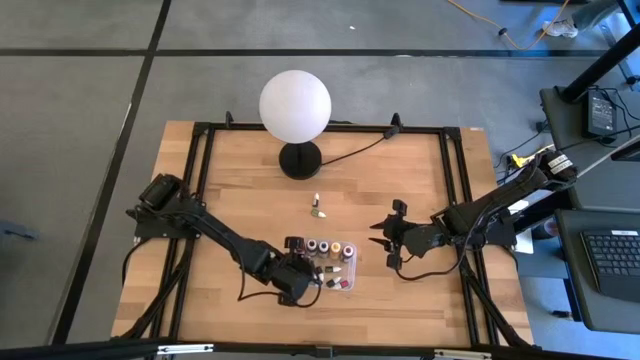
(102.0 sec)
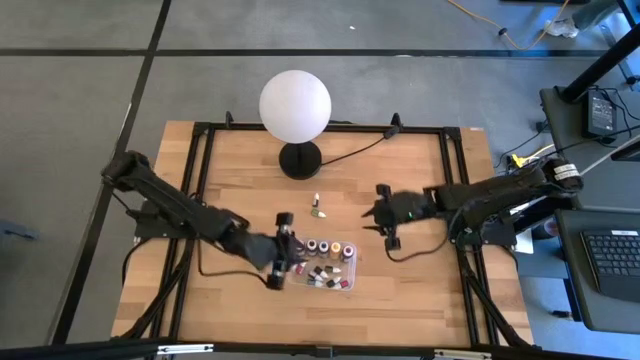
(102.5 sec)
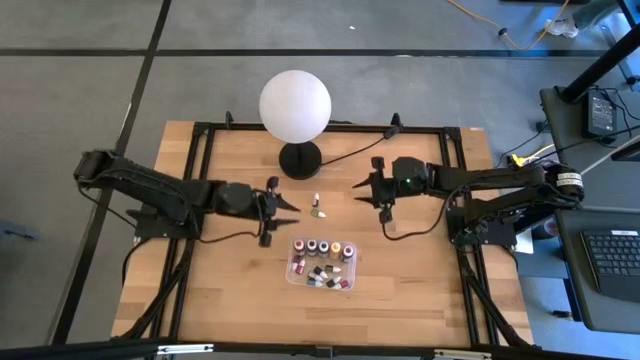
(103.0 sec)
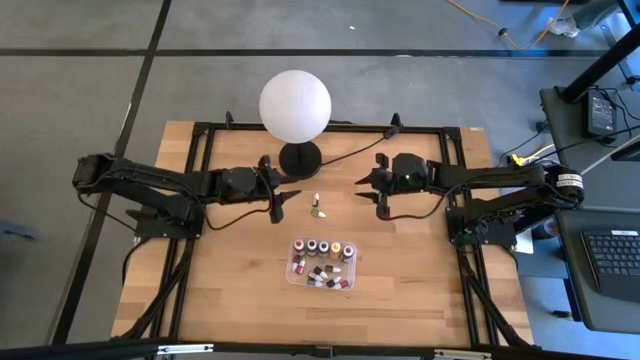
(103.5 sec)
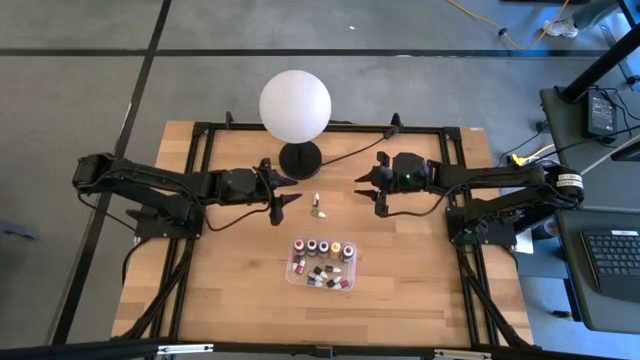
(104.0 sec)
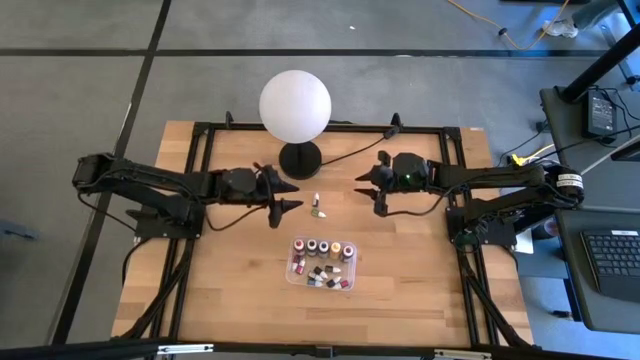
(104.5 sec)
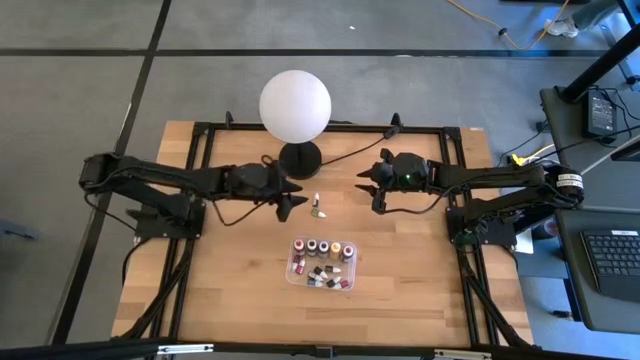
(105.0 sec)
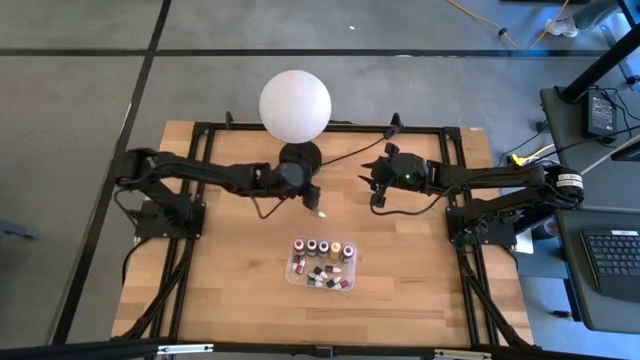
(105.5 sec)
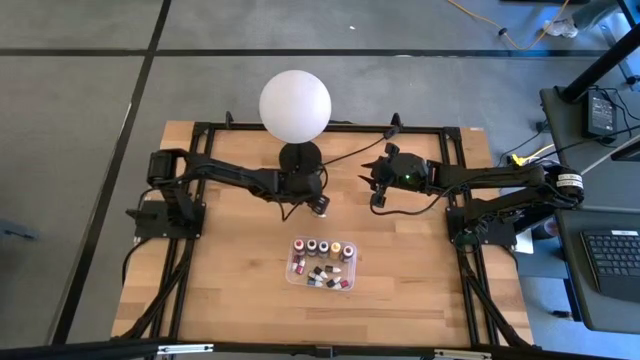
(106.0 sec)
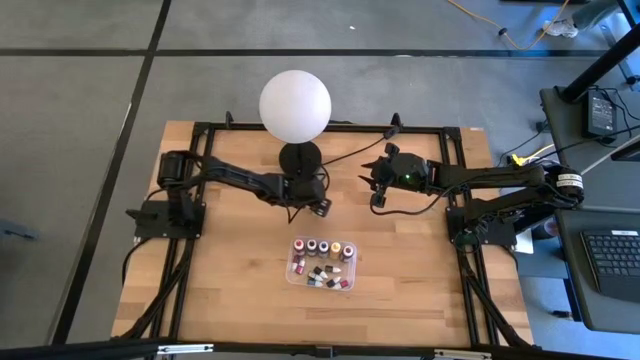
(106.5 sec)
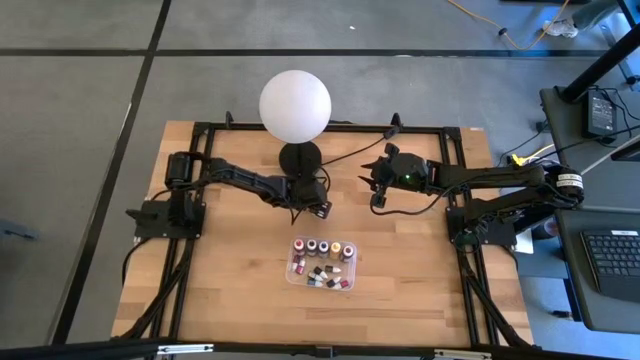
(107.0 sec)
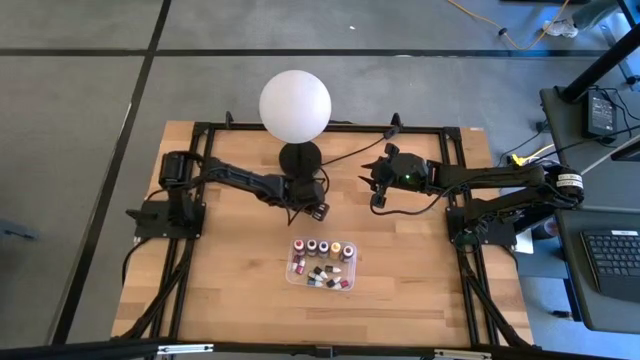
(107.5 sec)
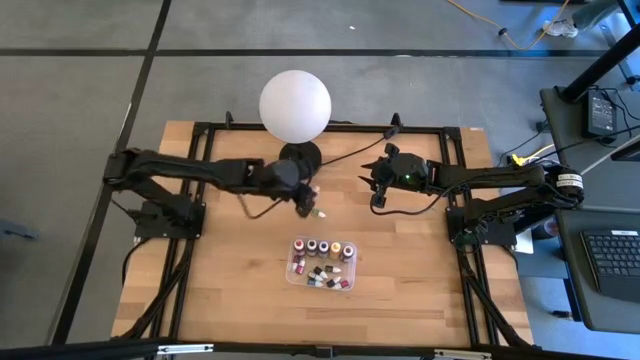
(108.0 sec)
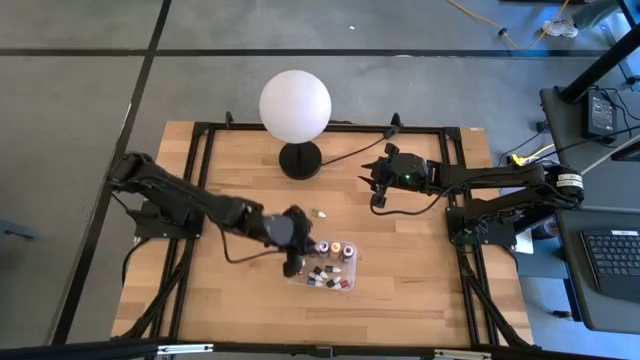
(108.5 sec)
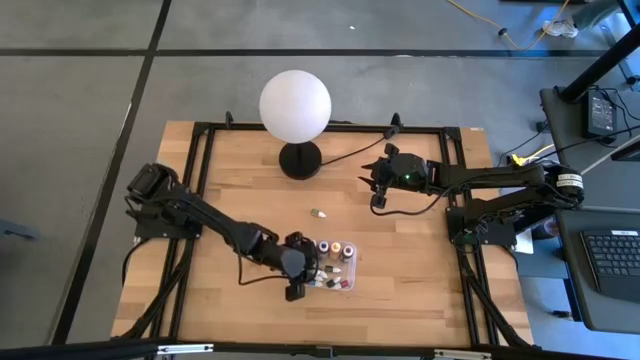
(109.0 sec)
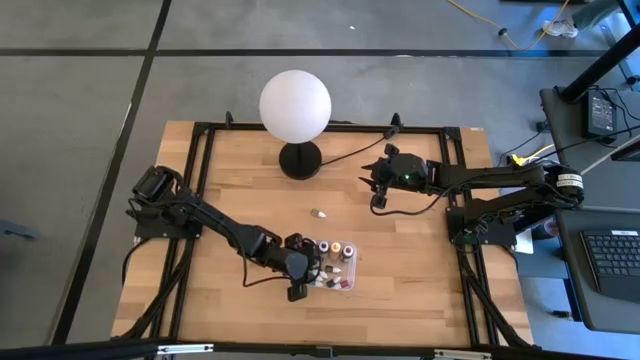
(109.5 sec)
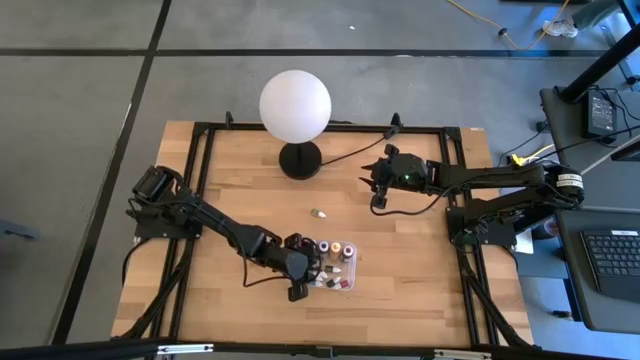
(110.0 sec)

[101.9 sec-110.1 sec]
Task: Pick & Place food coloring
Put the small red food coloring bottle into the transparent bin

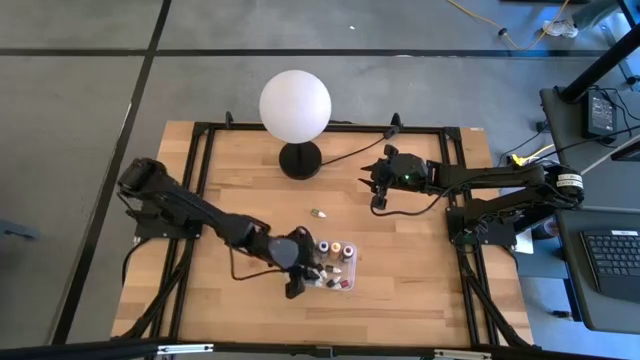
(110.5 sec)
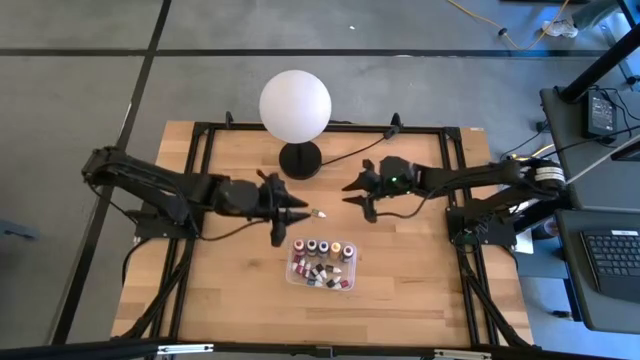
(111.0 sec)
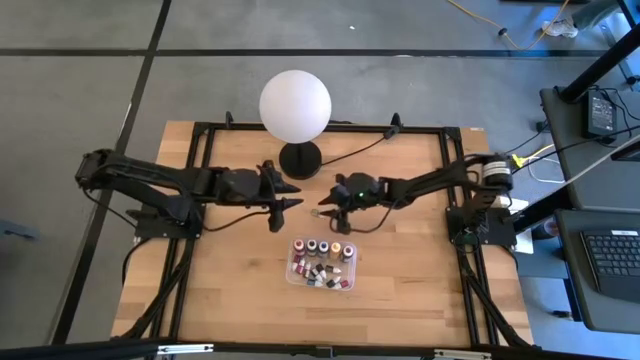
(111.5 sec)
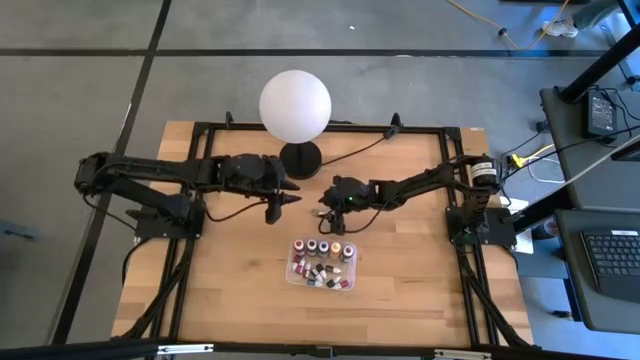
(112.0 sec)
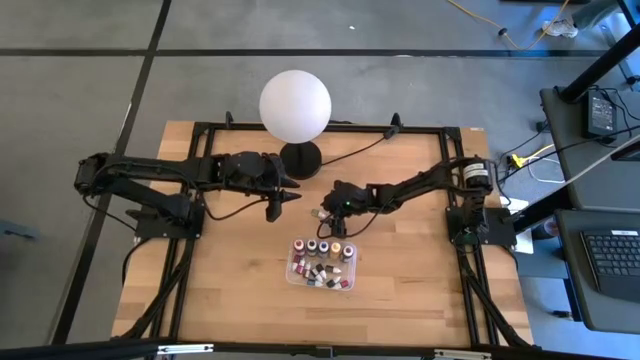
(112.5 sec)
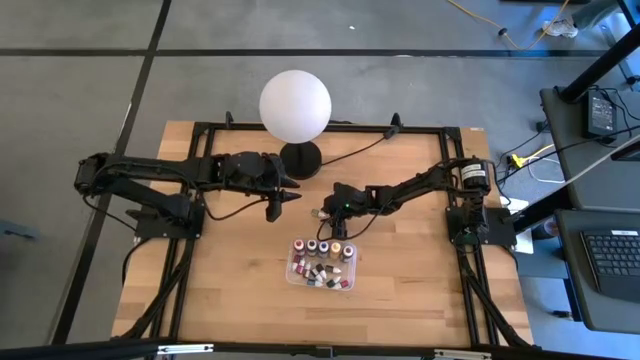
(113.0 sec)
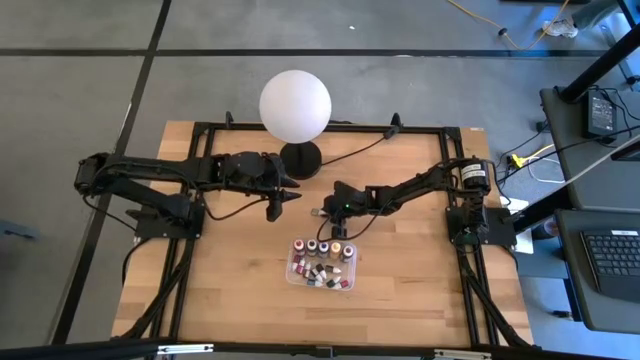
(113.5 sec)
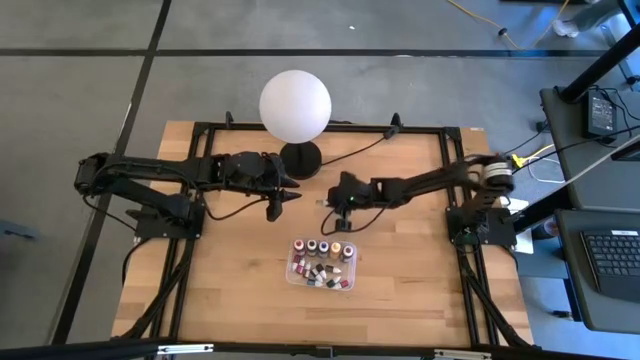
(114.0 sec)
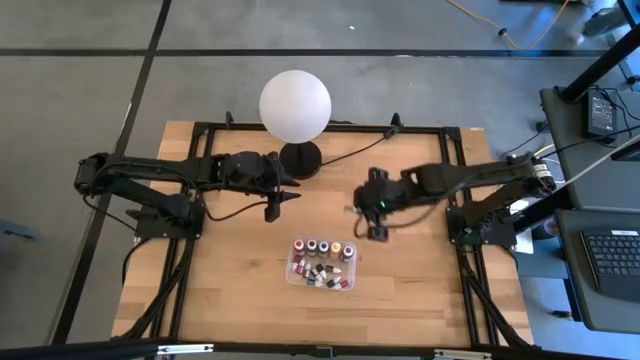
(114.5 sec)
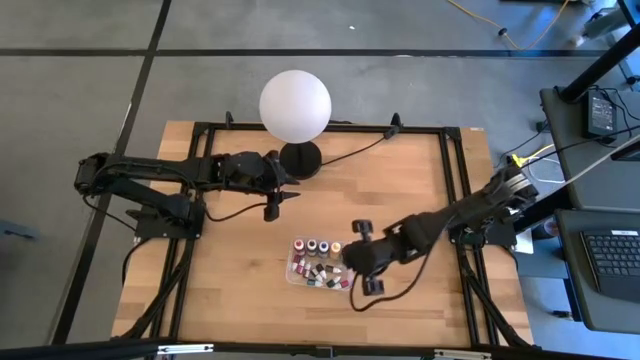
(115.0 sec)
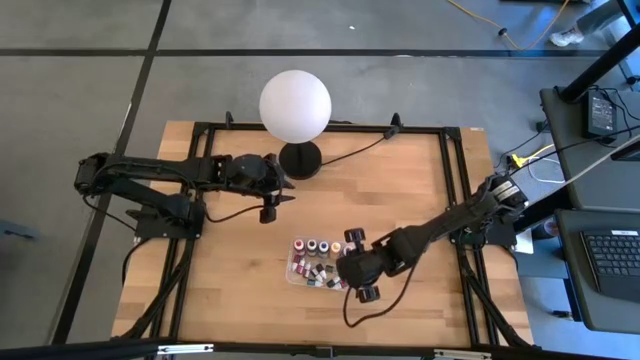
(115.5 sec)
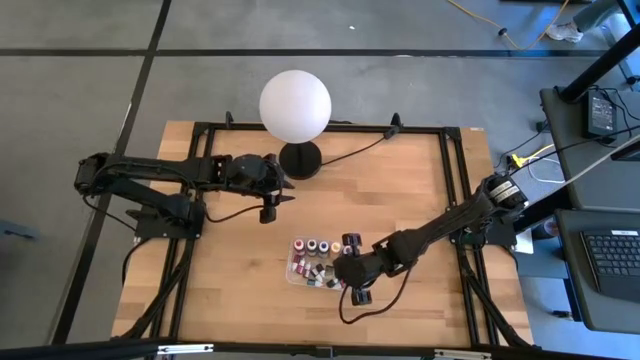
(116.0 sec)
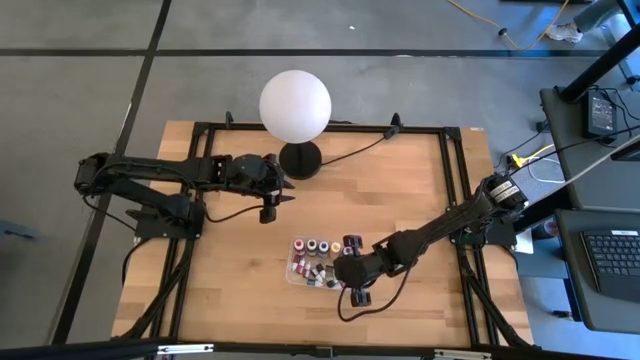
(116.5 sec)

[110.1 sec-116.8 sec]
Put the small green food coloring bottle into the transparent bin

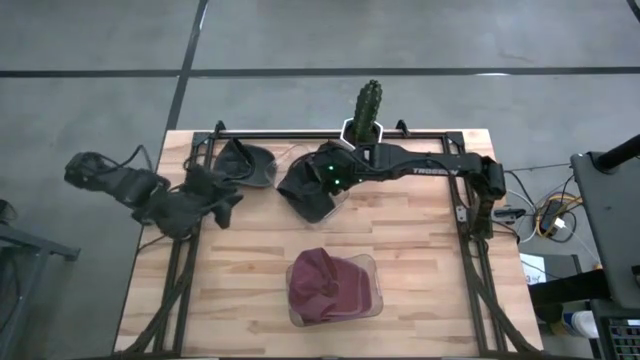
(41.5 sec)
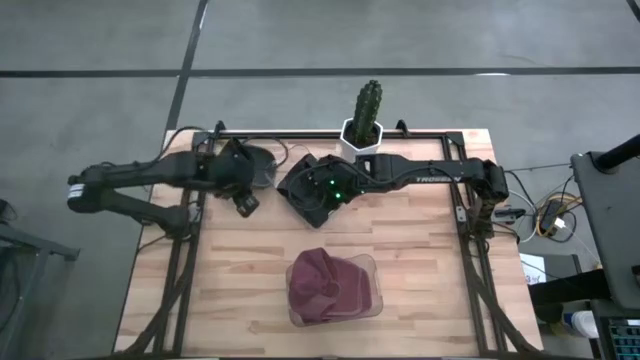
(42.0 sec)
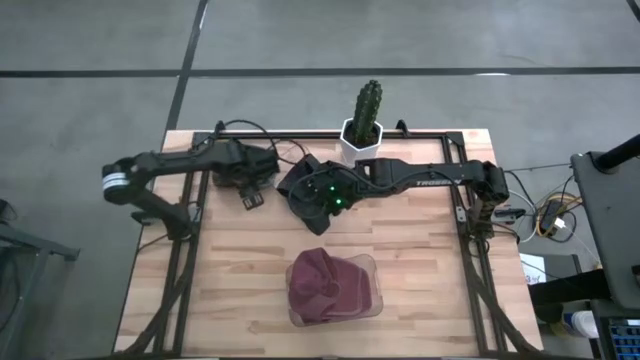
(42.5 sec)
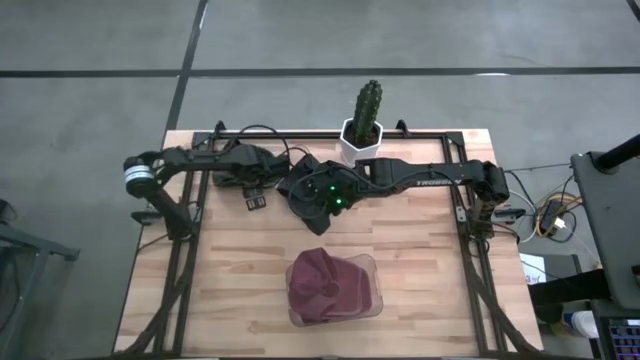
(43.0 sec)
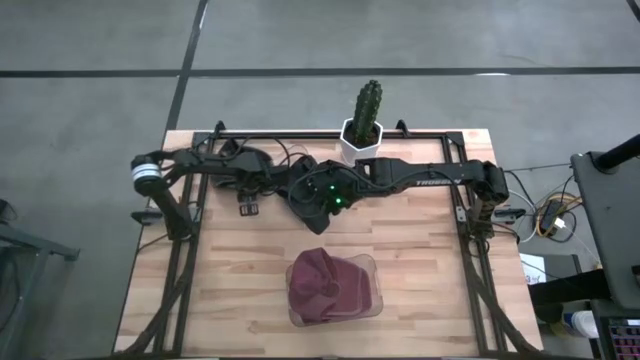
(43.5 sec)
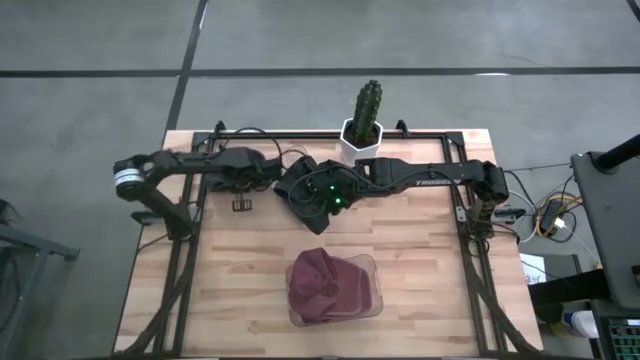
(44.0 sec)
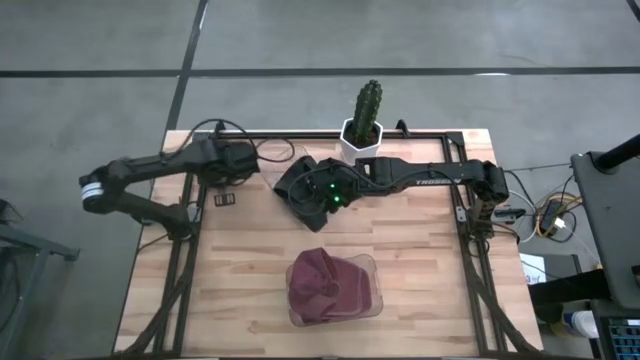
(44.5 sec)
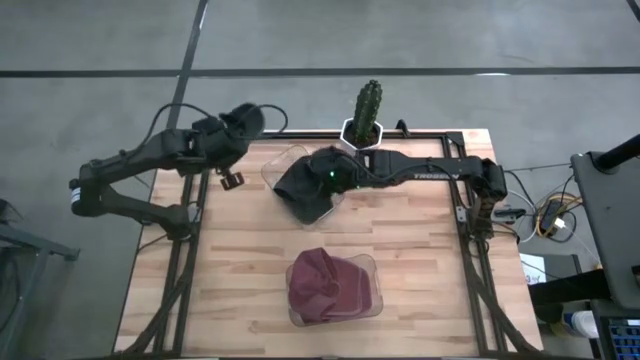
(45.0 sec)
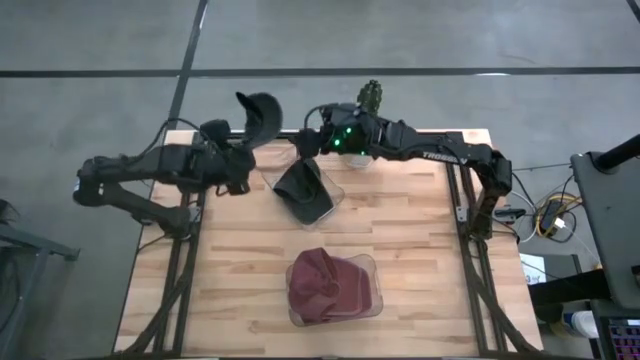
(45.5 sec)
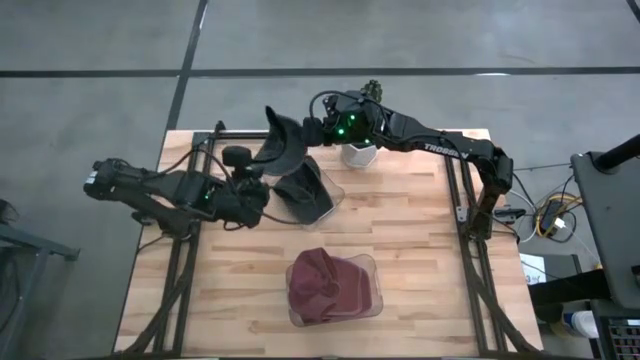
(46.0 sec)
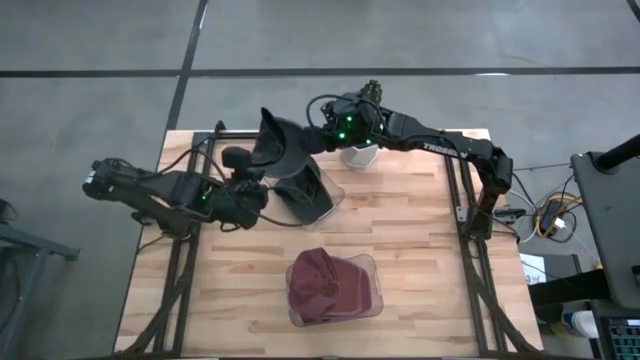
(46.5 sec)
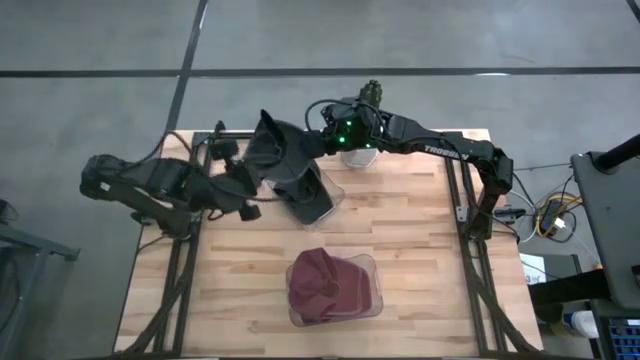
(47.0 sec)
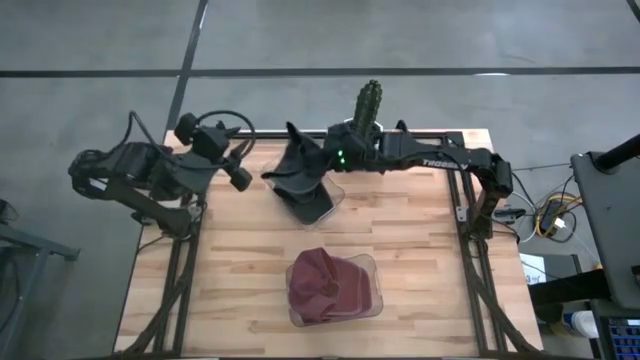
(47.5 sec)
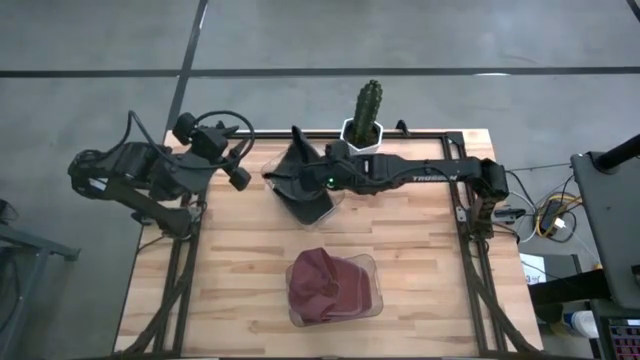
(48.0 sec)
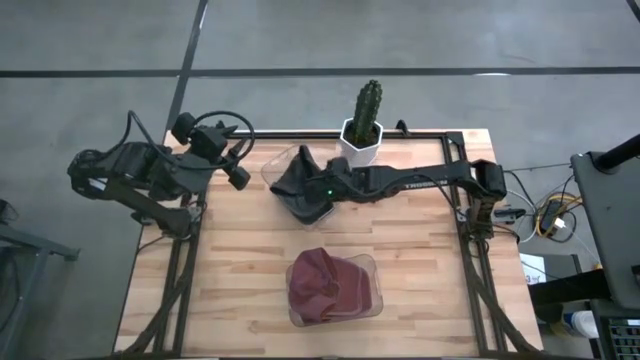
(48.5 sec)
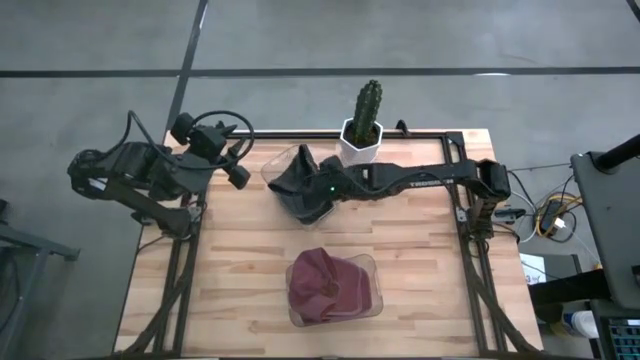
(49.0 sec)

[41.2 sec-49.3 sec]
Task: Pick & Place hat
Put the black cap into the top transparent bin
